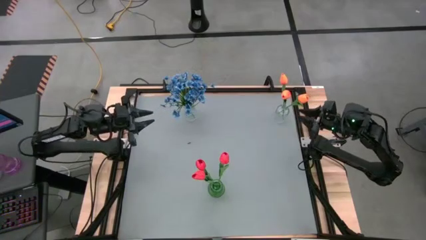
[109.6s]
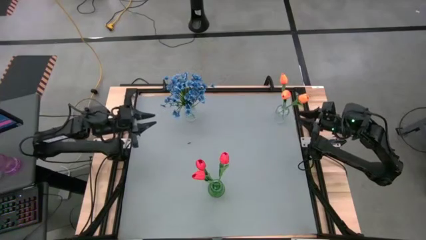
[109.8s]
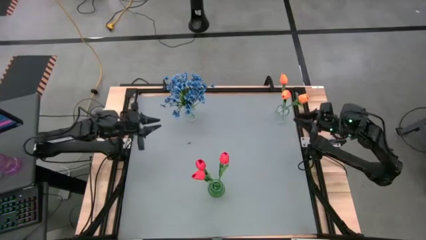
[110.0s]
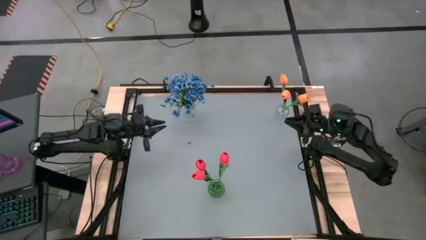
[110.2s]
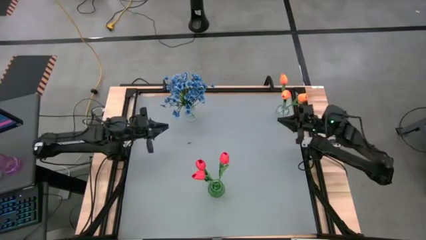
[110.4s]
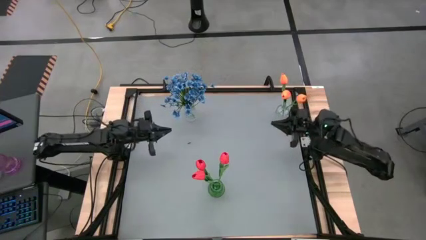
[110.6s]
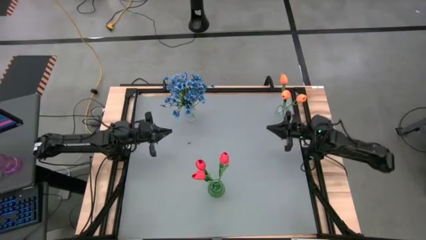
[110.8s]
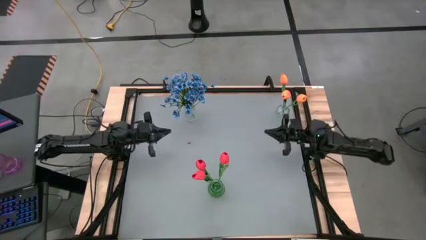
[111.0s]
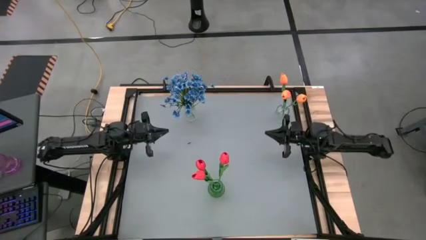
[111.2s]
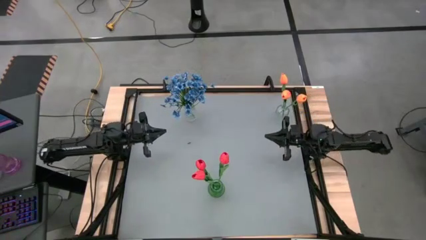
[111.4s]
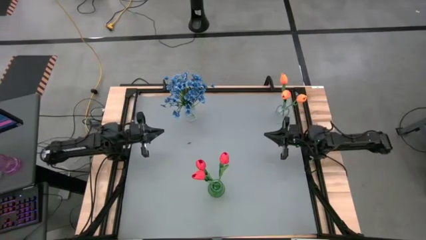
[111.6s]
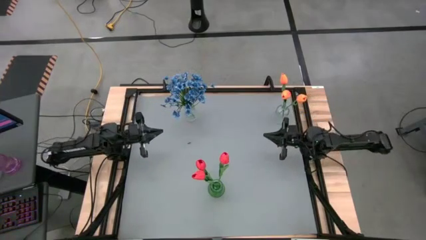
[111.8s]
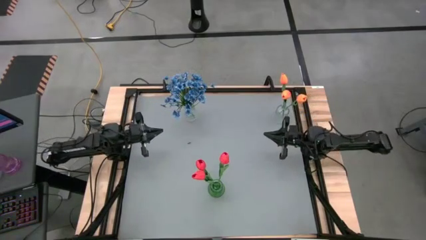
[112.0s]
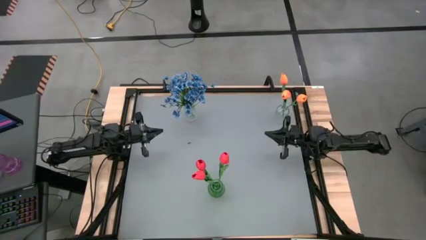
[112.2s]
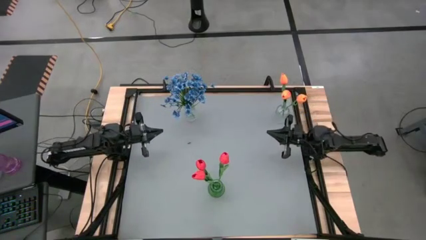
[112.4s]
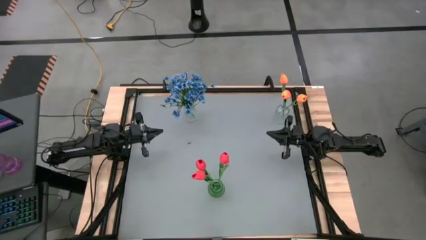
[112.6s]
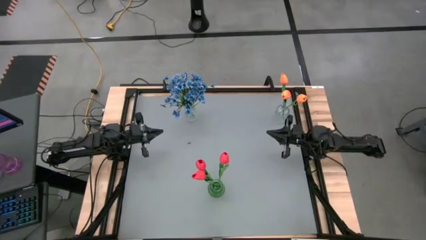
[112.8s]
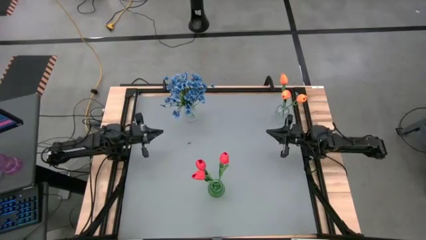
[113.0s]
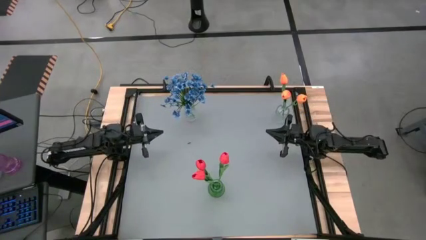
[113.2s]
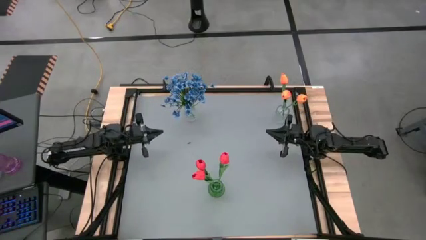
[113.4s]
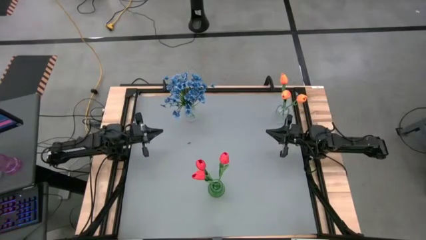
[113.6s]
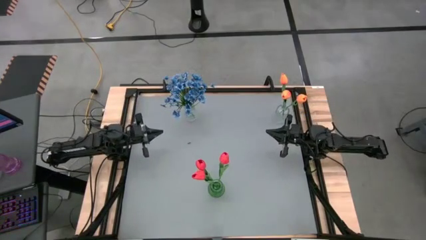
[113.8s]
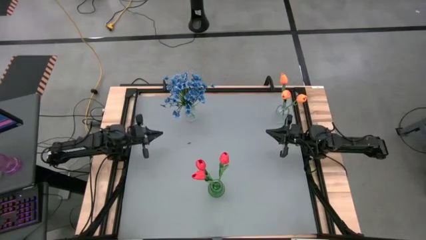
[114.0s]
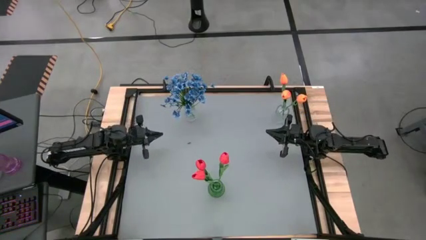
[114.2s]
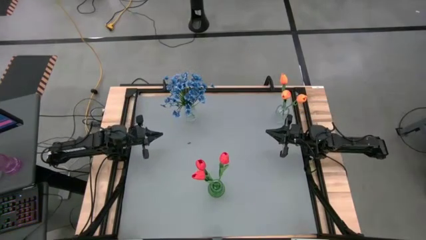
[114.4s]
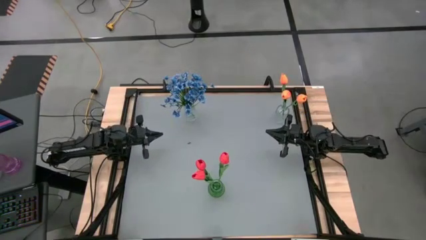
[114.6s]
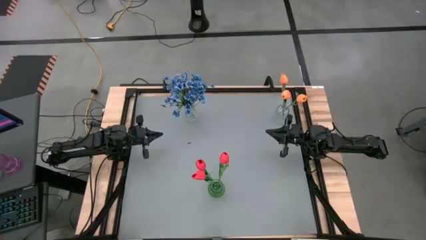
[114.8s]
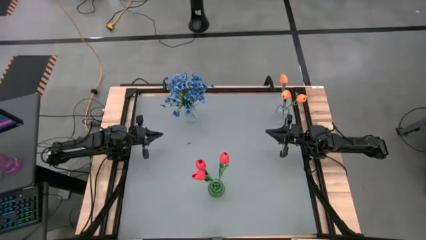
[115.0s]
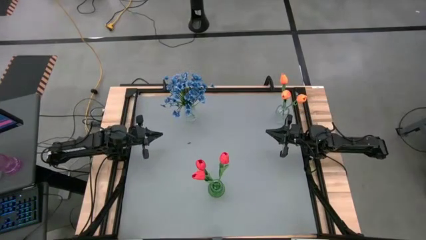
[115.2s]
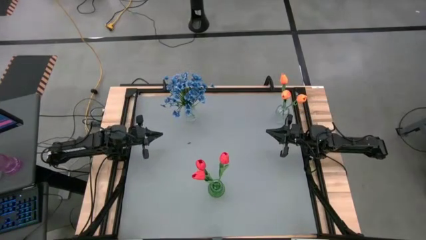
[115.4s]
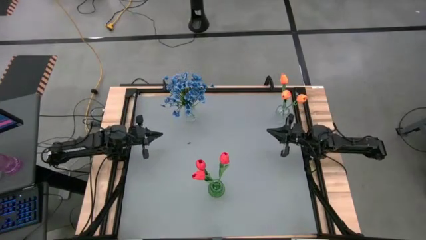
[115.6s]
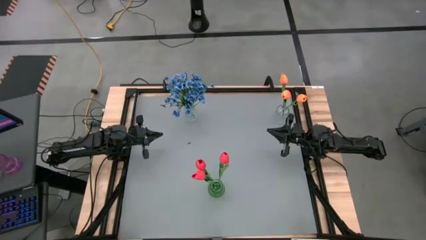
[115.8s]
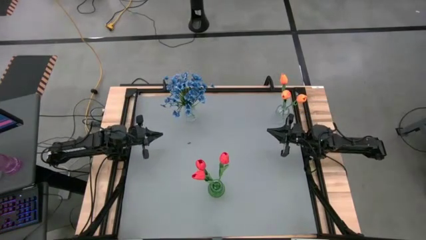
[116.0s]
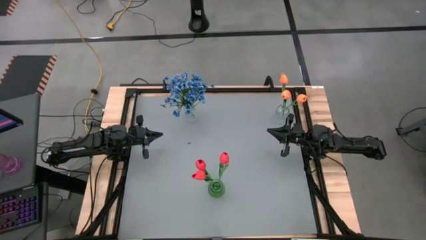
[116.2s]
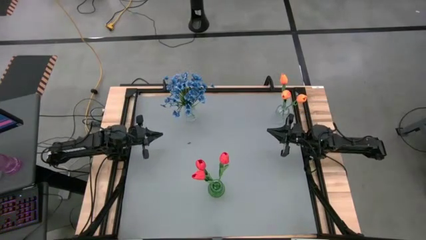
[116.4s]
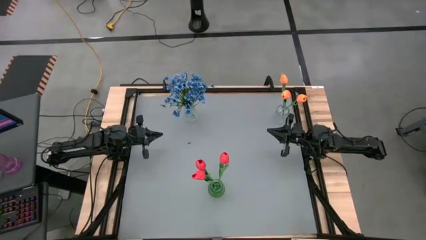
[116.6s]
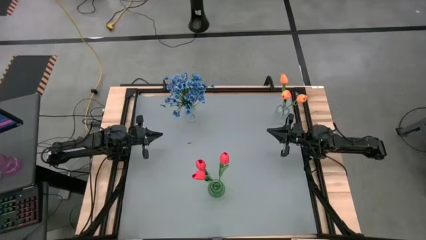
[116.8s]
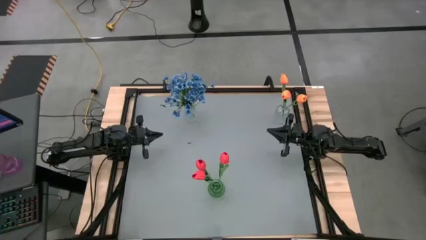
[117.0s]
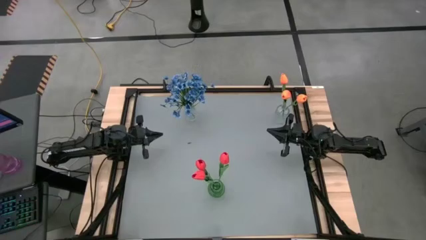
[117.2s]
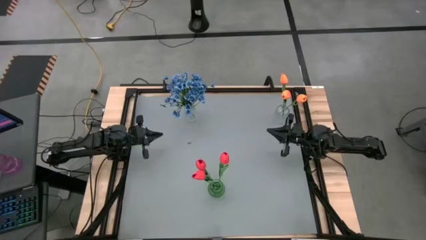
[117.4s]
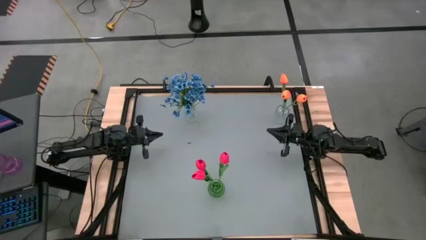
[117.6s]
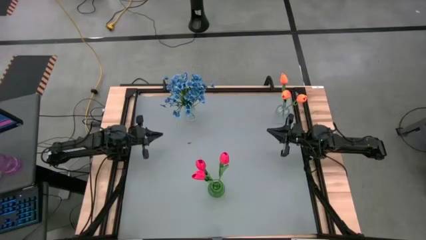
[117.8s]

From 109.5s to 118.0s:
Task: Sort flowers into vase by color
Return to Home Position

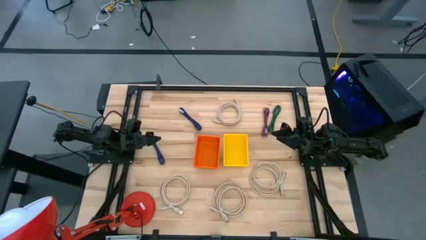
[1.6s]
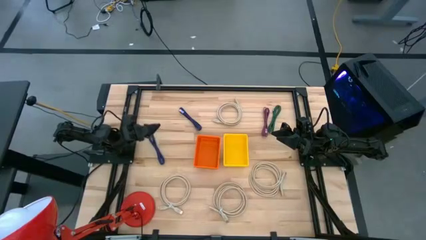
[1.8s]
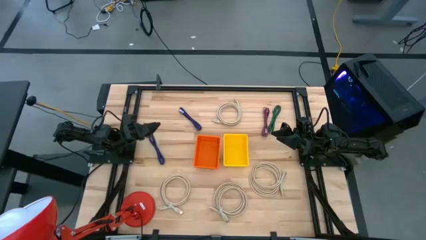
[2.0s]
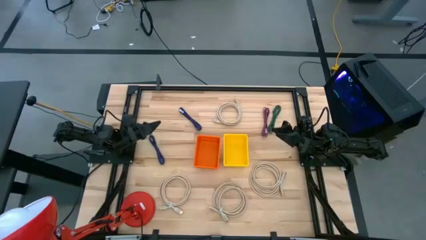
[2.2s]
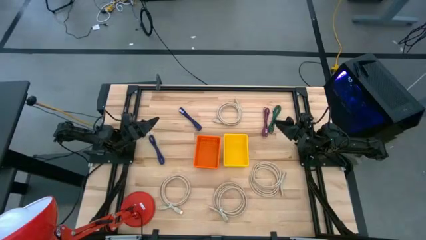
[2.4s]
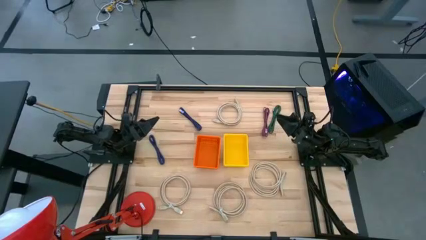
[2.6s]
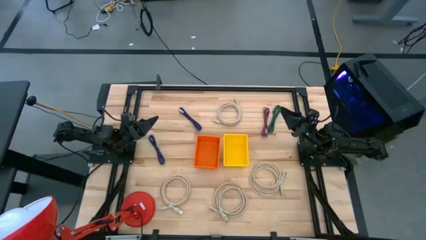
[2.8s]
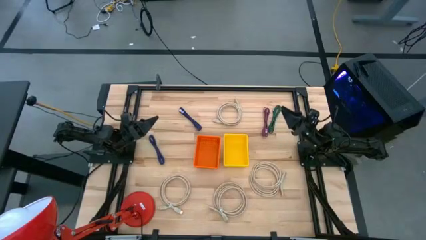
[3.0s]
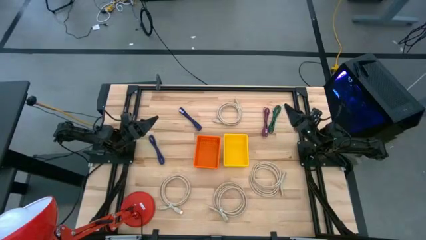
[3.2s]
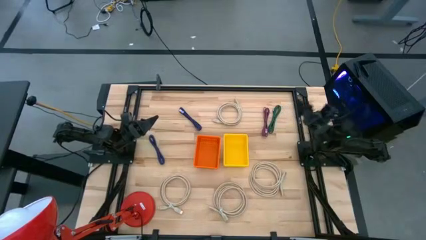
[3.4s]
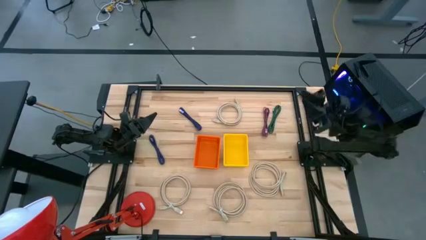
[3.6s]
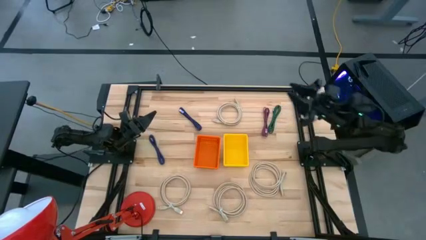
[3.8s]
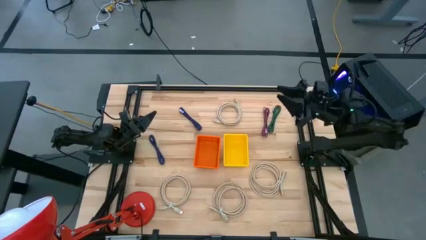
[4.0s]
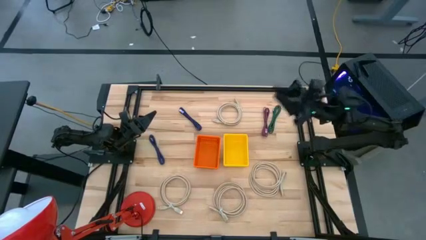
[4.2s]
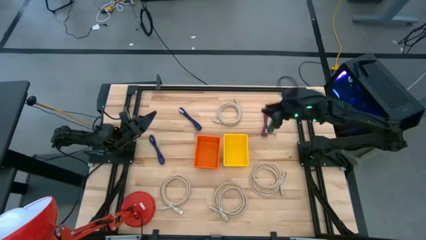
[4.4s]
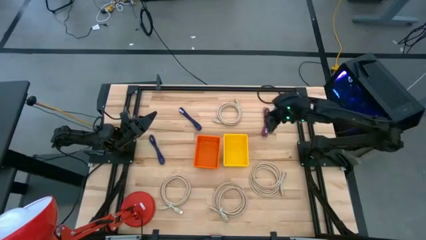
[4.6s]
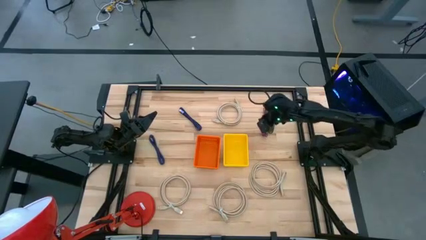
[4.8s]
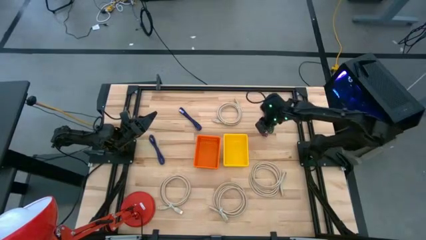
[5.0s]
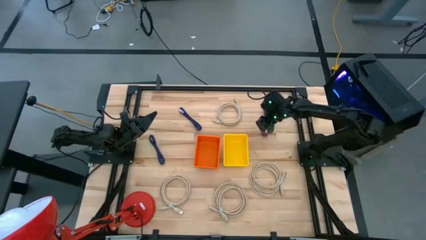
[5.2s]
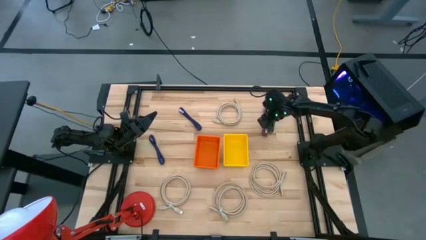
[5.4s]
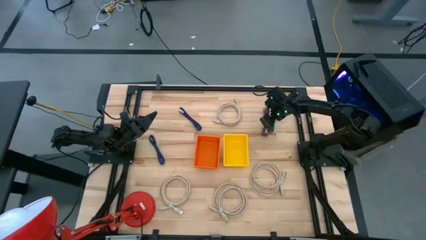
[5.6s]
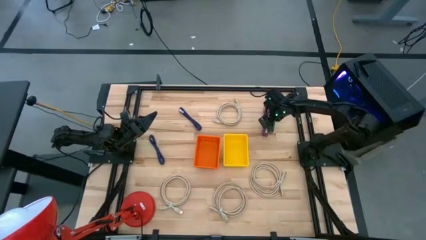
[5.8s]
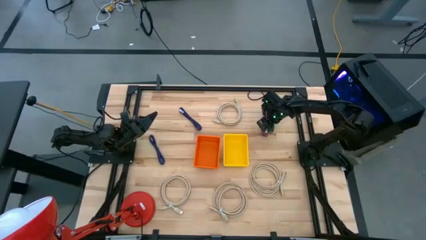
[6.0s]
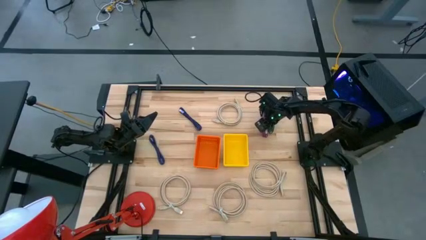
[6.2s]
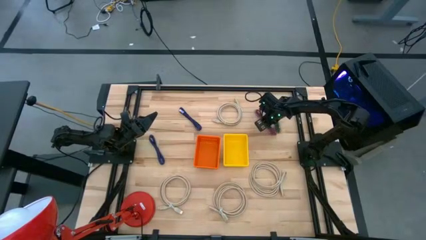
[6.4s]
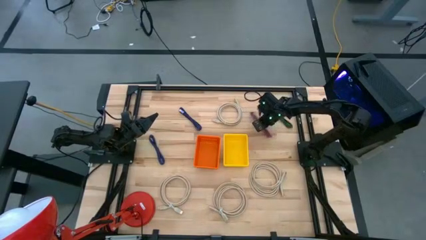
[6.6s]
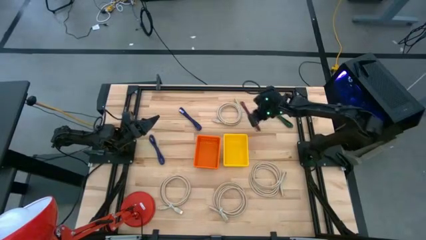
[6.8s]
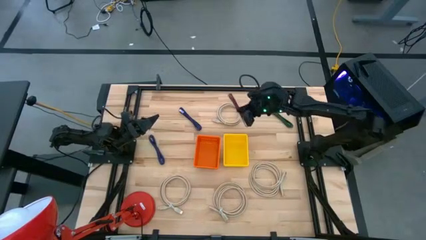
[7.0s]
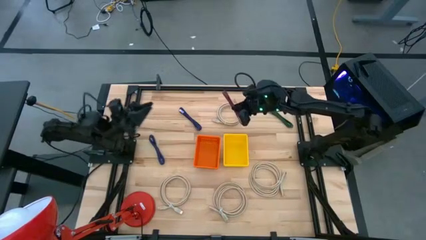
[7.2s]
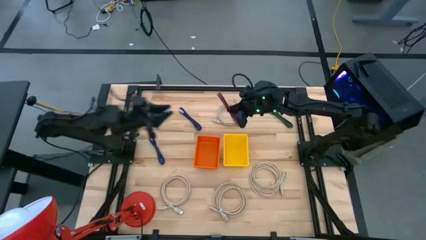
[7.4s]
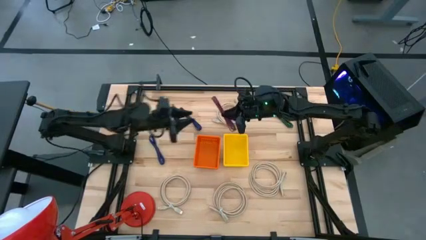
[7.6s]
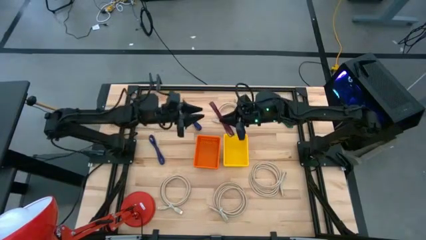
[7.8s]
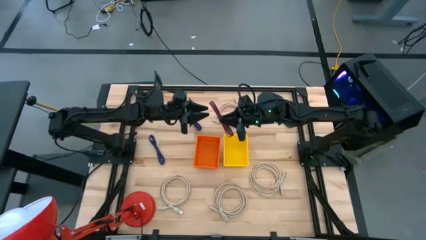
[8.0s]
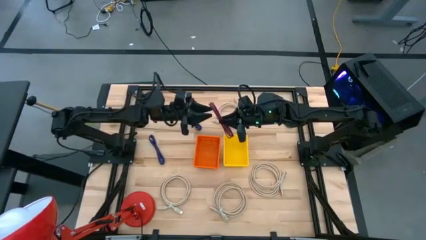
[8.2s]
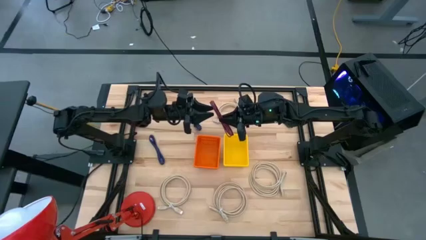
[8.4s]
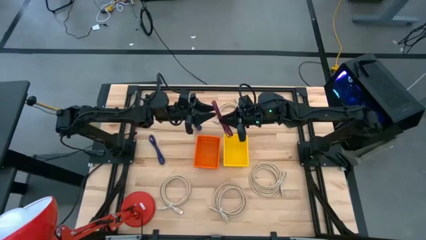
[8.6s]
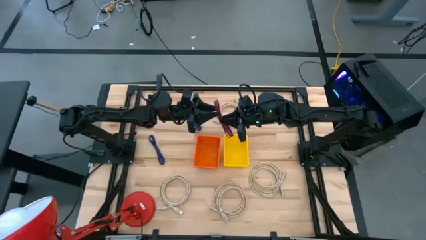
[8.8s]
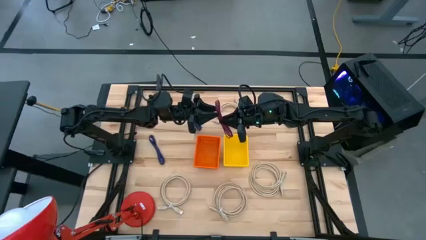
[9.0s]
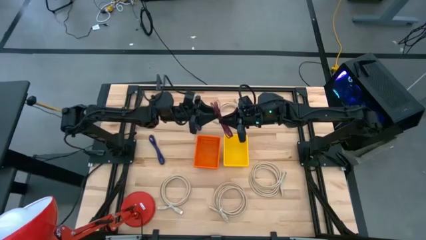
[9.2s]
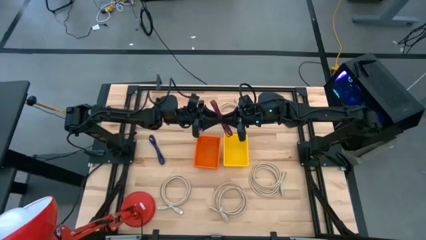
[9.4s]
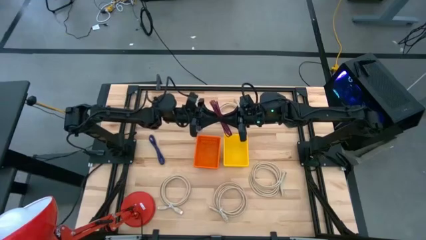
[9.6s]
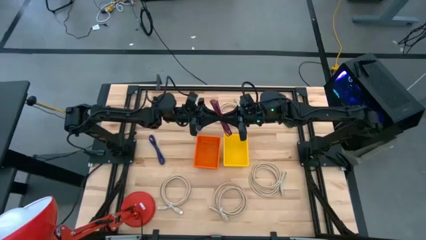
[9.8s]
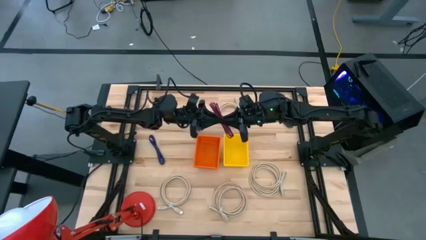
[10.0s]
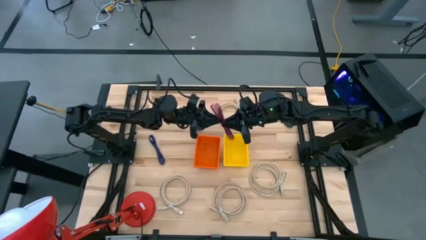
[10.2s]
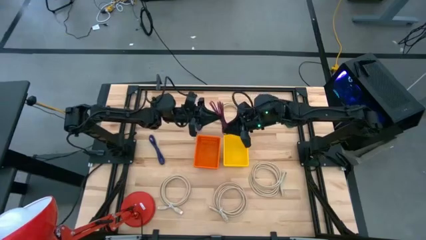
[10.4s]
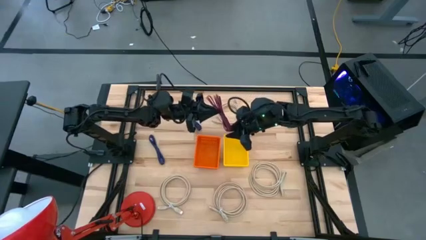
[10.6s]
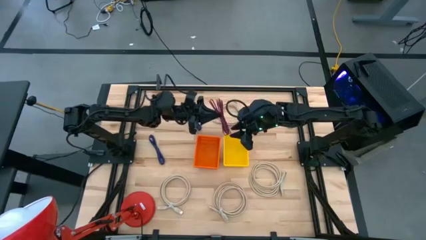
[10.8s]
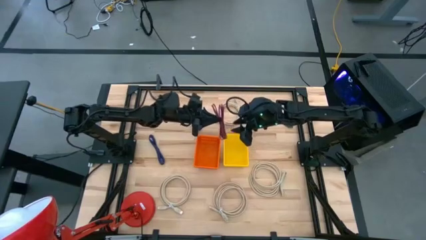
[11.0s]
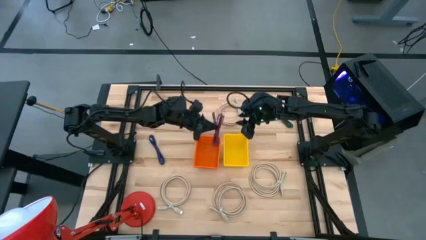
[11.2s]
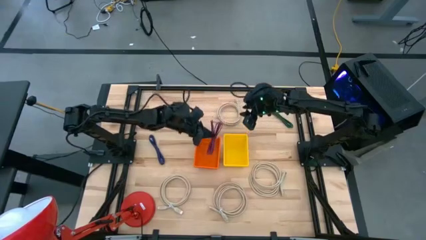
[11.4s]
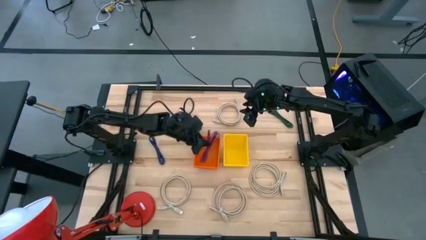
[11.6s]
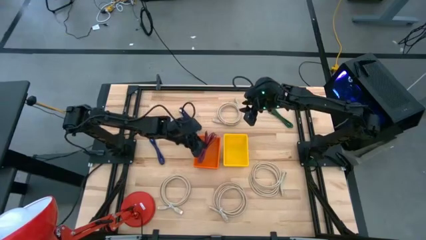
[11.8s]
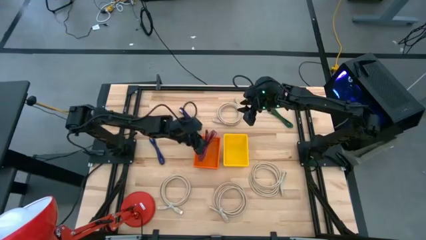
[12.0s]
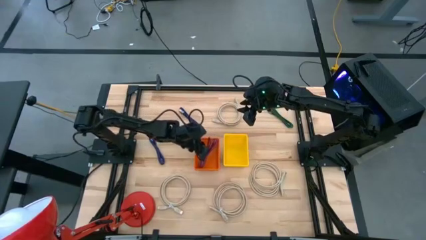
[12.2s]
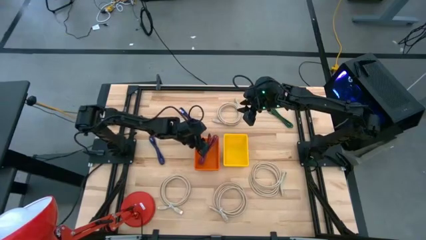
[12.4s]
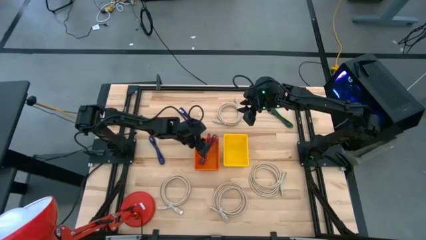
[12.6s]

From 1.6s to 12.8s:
Task: Pick & Place USB Port
Put the pink charger cable into the orange basket
